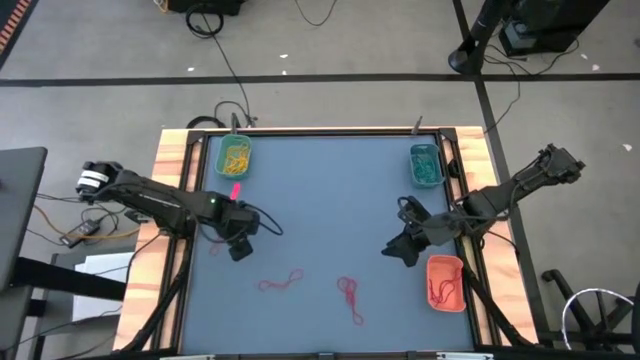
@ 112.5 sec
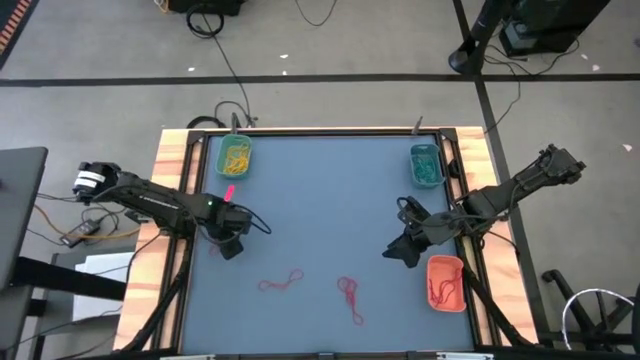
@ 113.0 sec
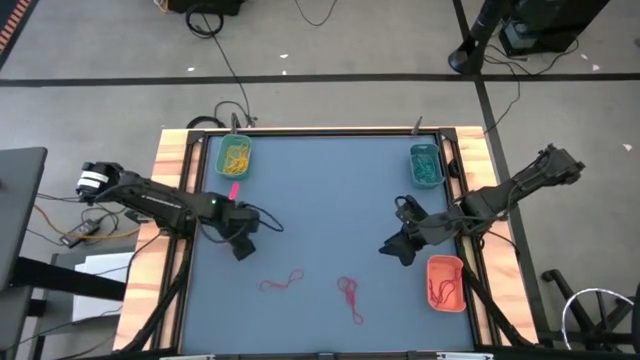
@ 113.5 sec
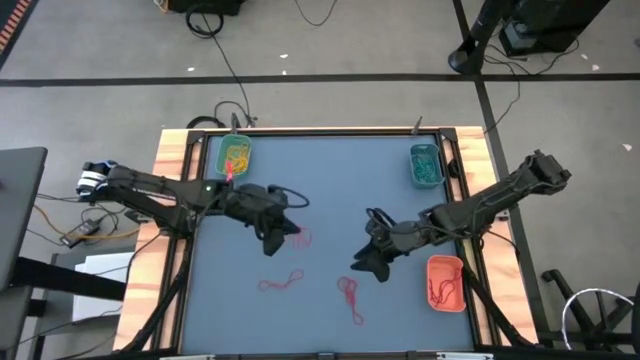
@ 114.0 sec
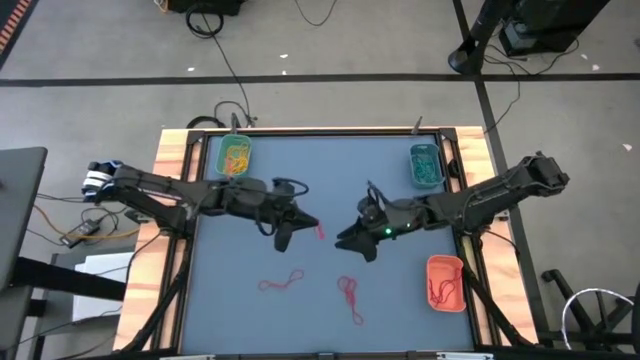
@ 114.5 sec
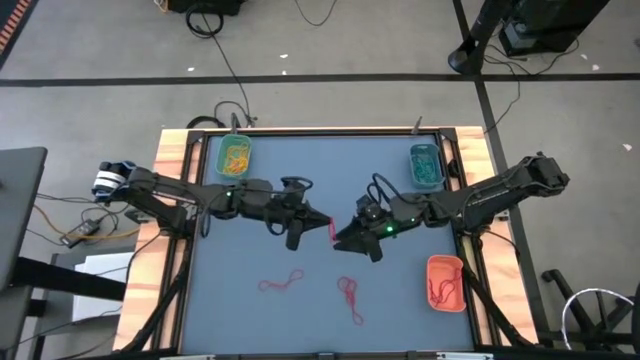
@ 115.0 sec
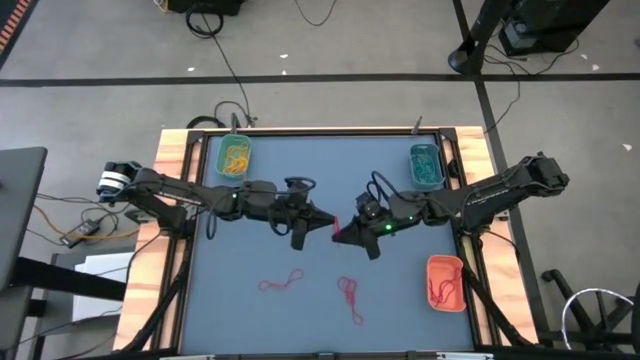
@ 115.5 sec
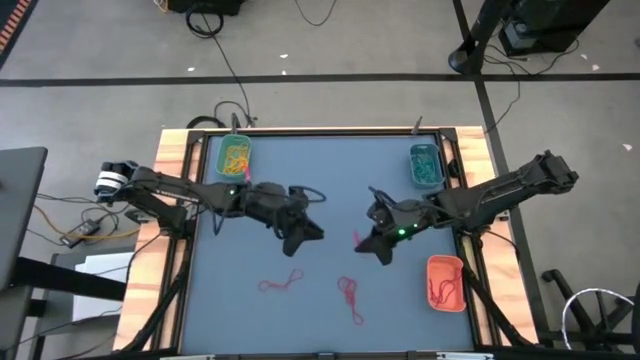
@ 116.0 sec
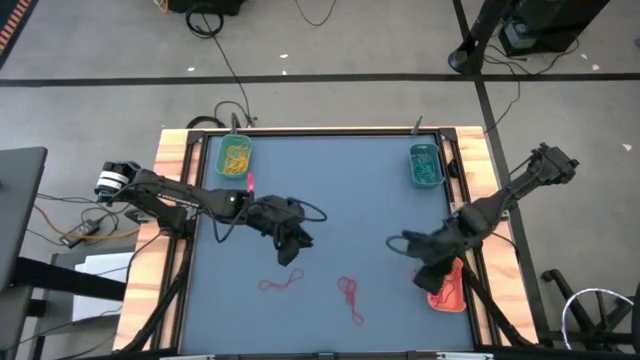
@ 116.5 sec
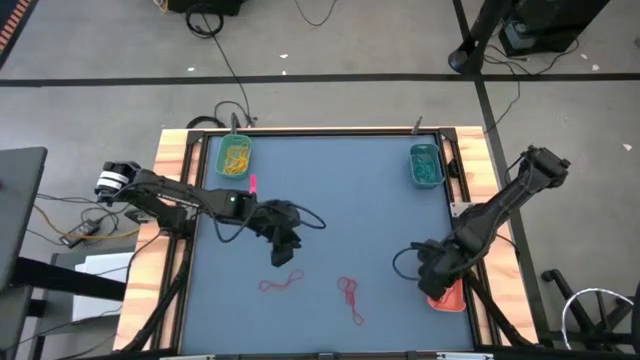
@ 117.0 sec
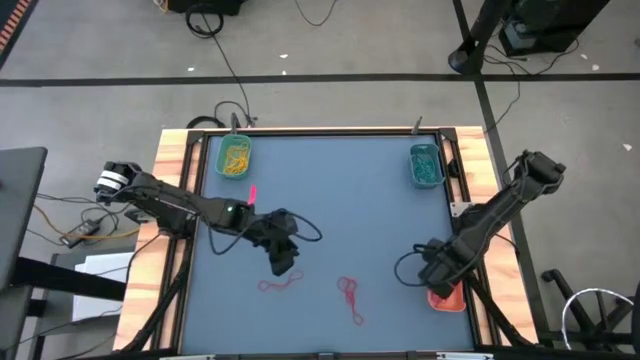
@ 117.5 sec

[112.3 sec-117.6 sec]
Task: Sort rubber bands into baskets
Put the red rubber band into the orange bin

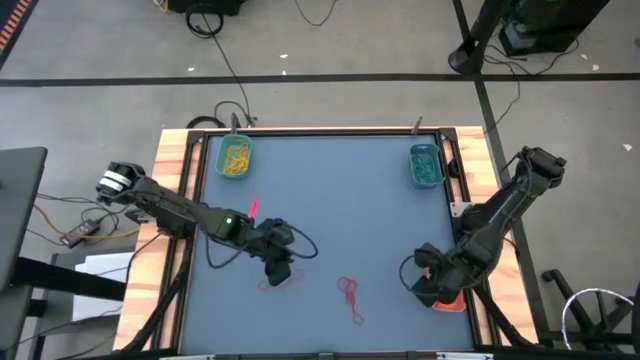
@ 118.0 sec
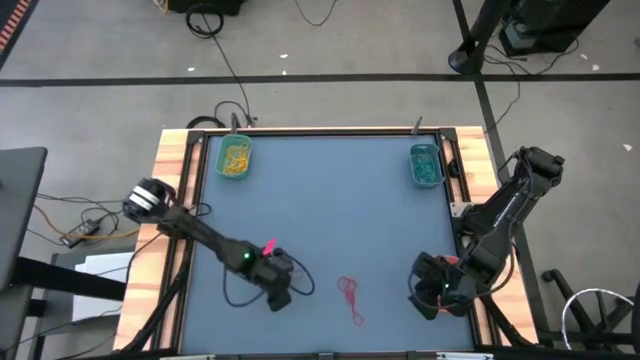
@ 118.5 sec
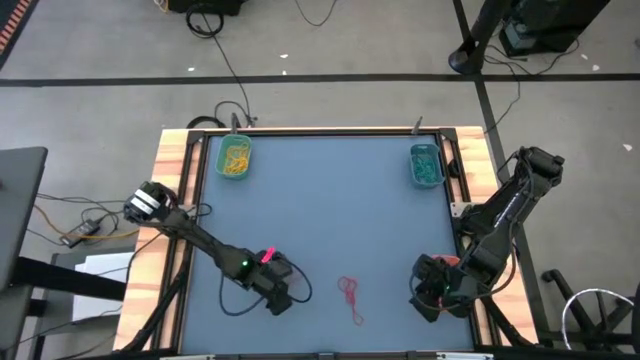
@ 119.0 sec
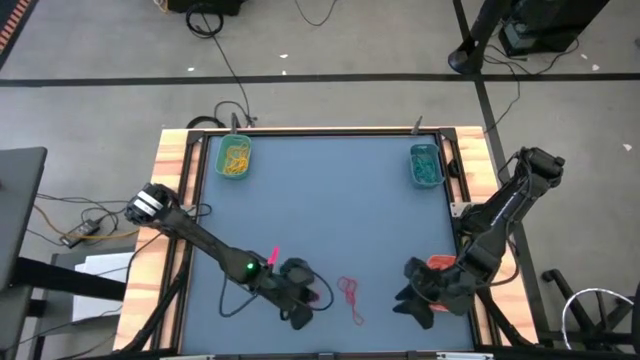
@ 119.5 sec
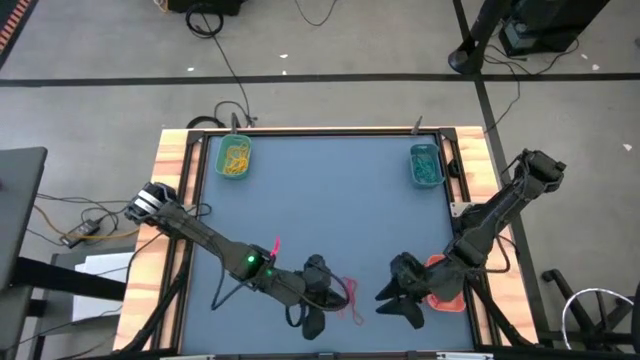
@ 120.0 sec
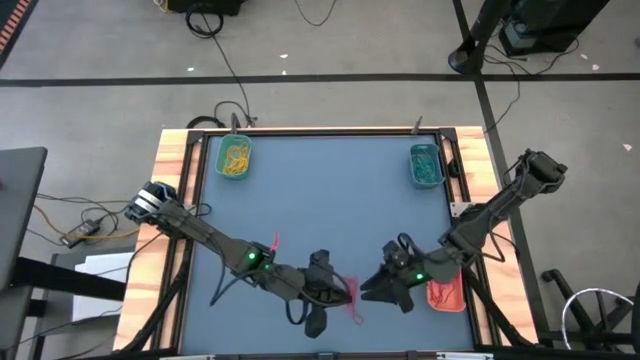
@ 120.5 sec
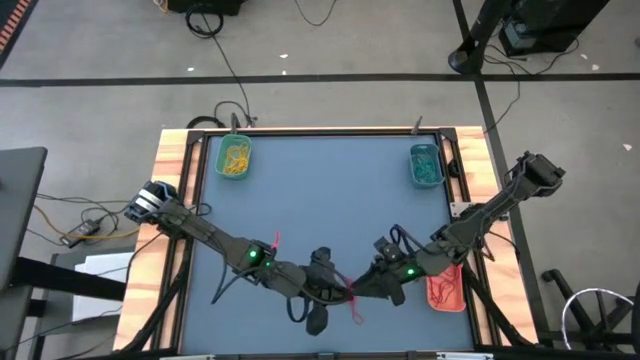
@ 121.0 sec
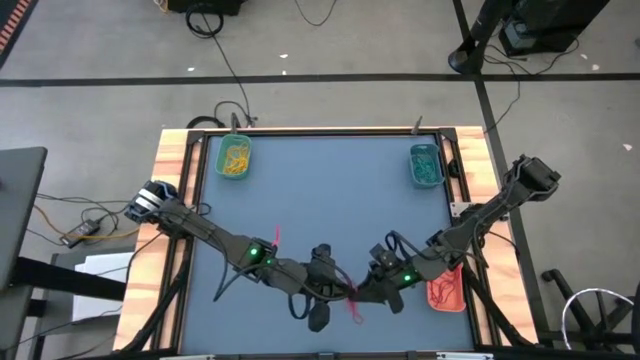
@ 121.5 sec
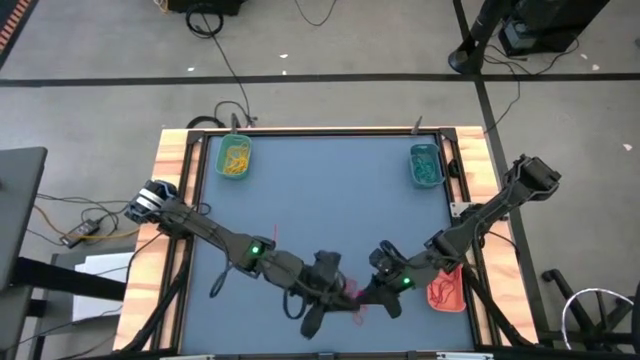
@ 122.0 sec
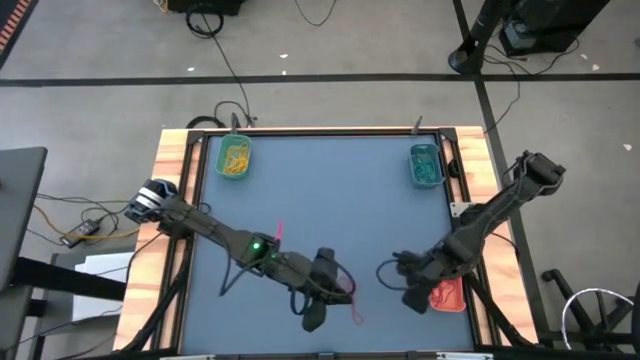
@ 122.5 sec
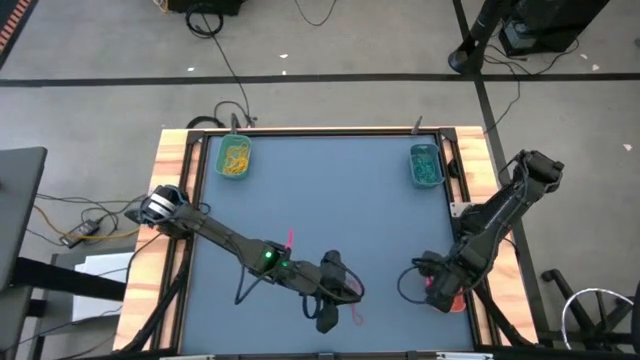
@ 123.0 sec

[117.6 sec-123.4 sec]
Put the red rubber band into the orange bin

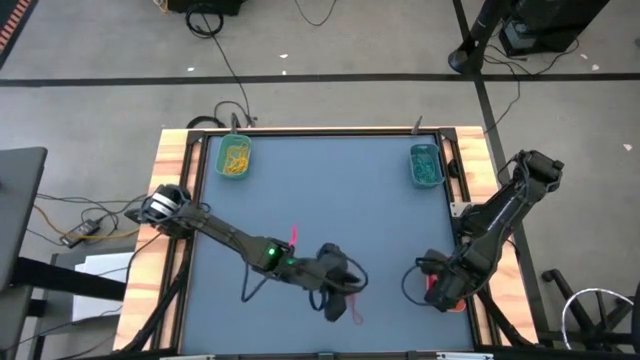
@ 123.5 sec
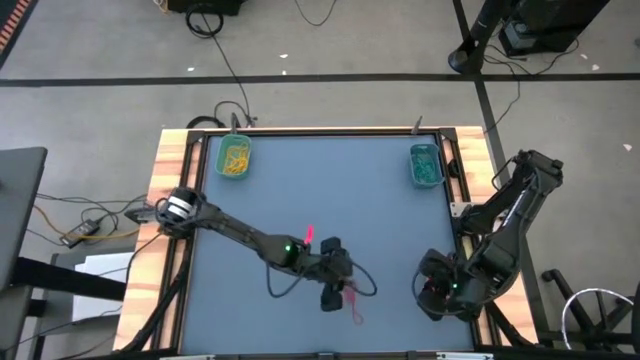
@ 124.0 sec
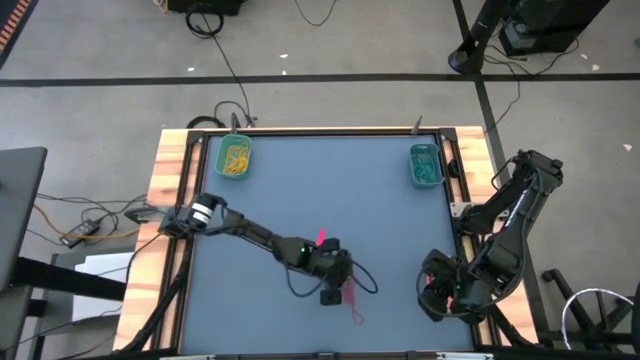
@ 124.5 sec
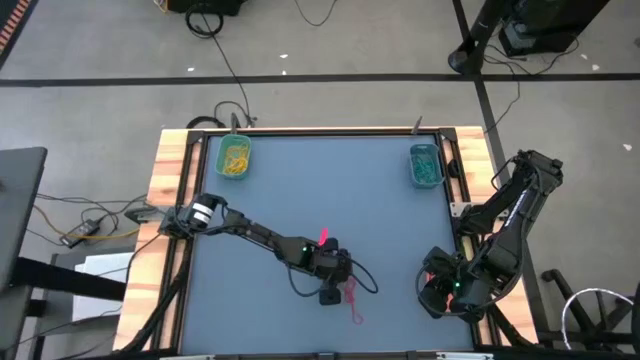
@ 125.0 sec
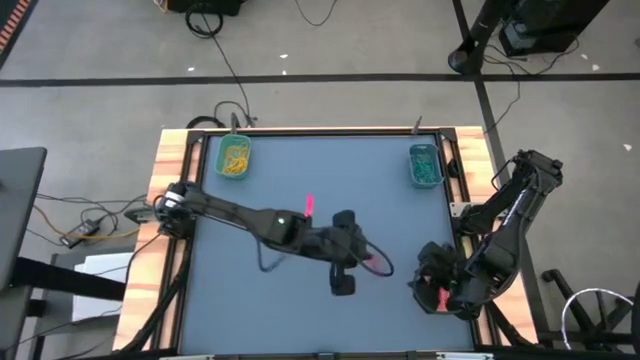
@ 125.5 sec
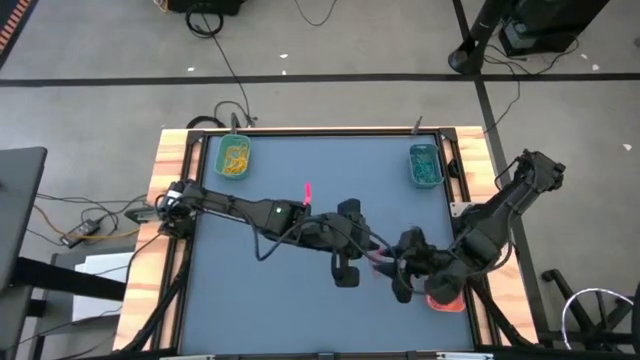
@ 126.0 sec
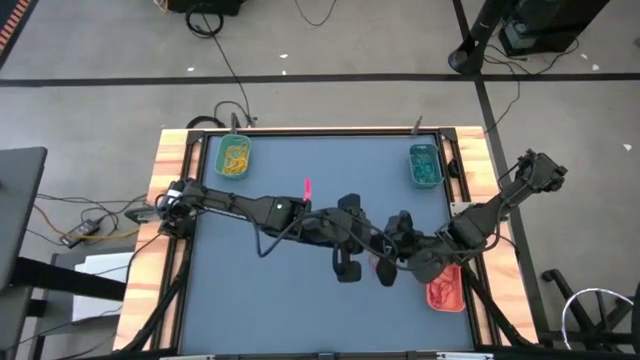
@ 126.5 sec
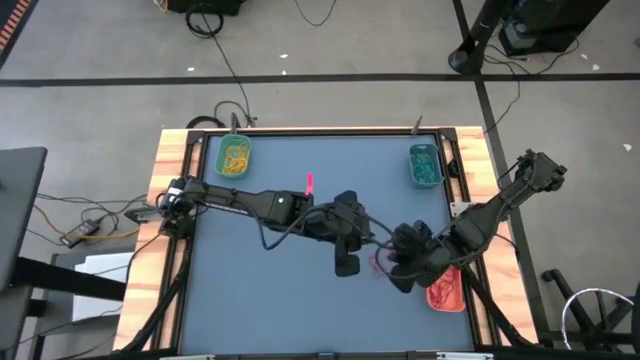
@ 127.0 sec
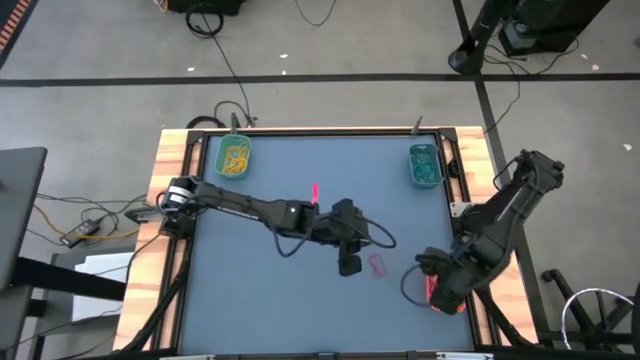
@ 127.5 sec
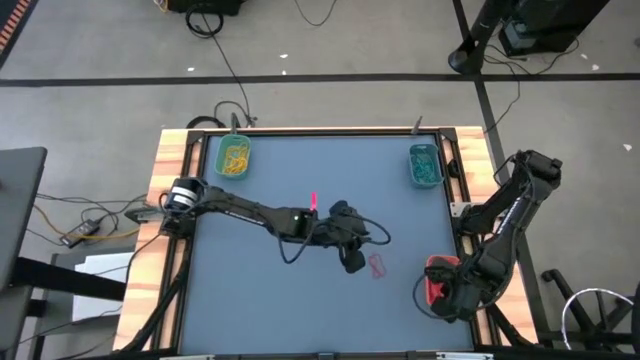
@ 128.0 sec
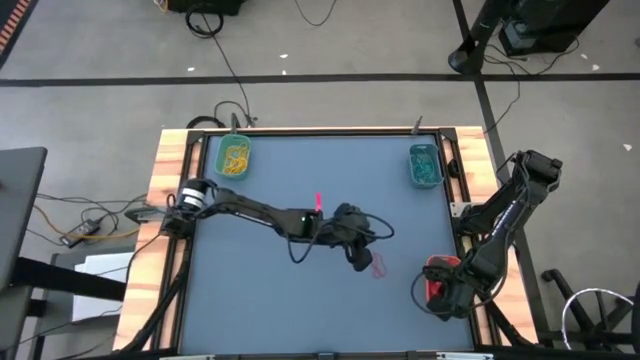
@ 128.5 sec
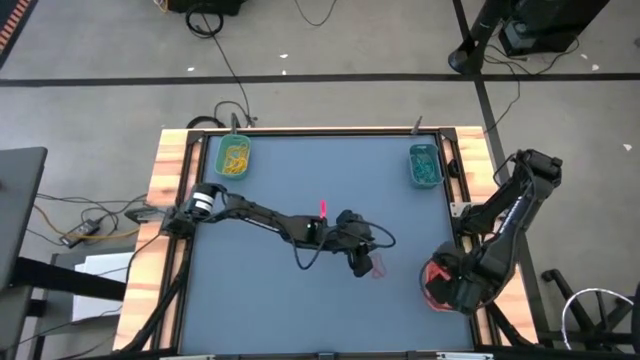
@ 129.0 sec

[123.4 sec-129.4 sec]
Put the red rubber band into the orange bin

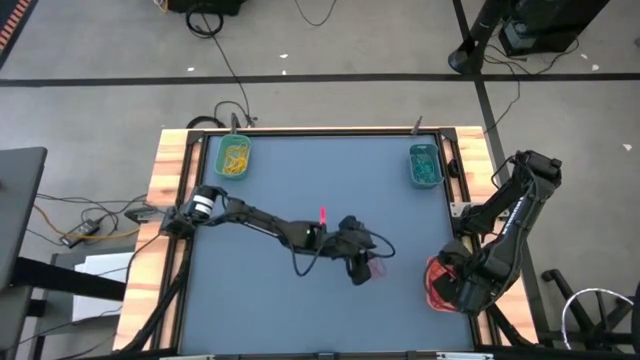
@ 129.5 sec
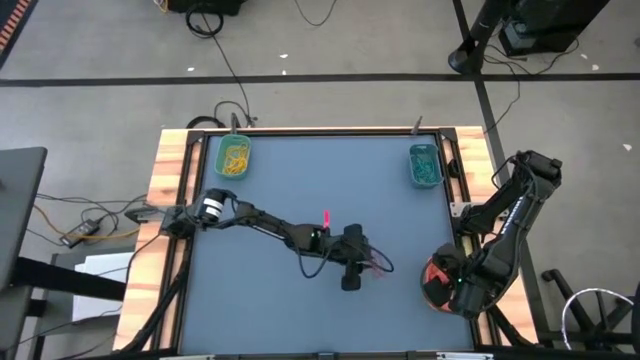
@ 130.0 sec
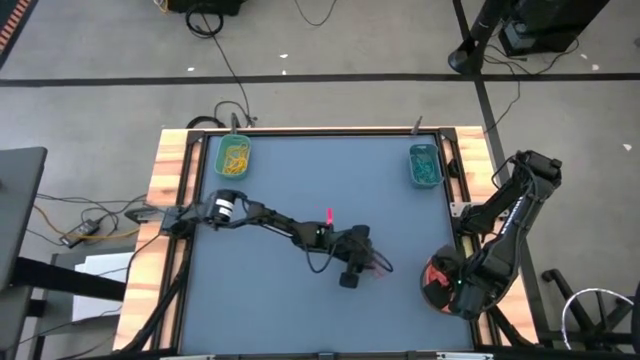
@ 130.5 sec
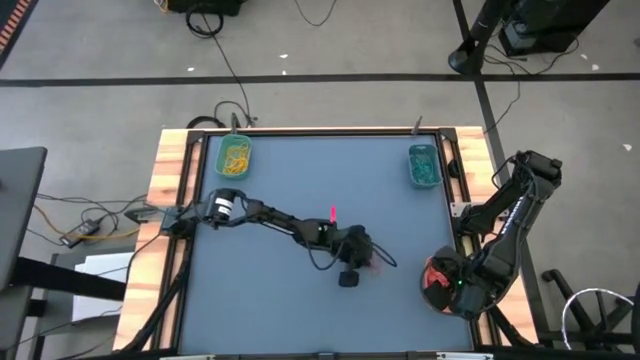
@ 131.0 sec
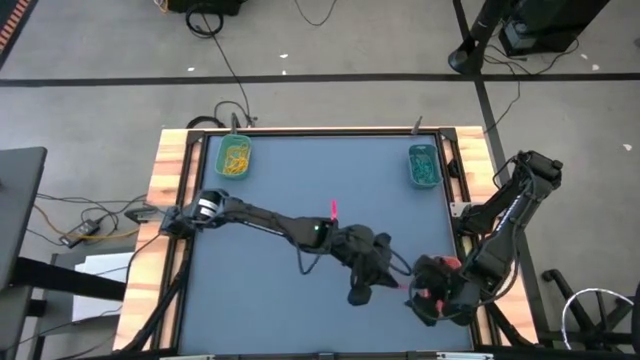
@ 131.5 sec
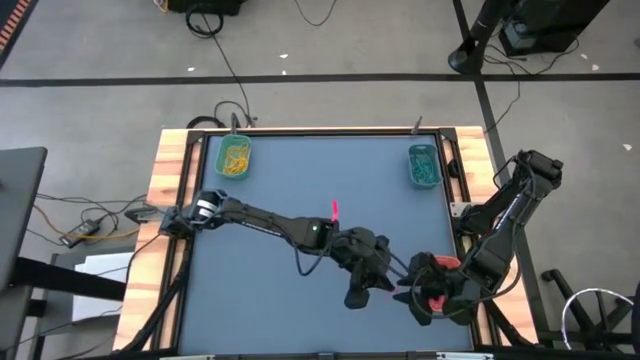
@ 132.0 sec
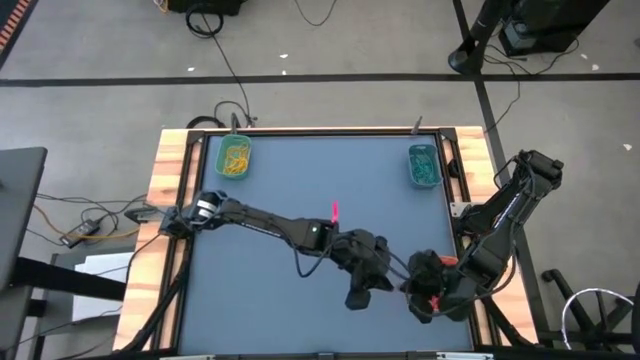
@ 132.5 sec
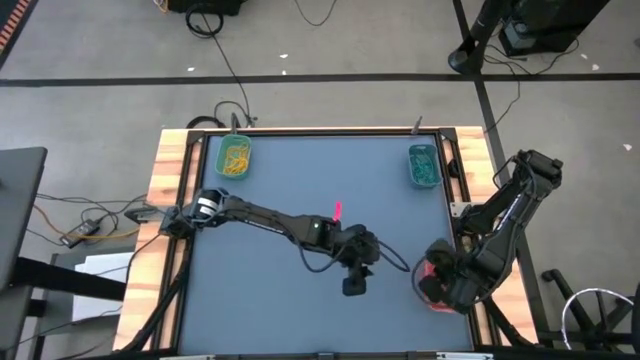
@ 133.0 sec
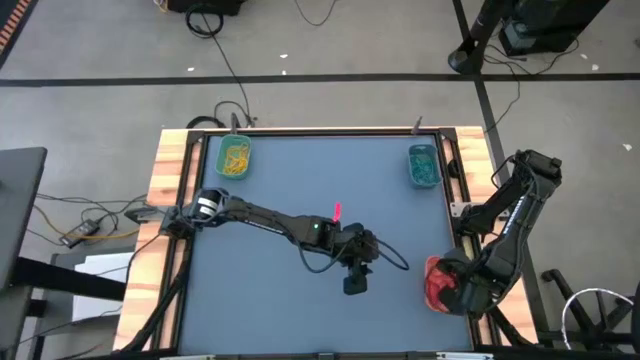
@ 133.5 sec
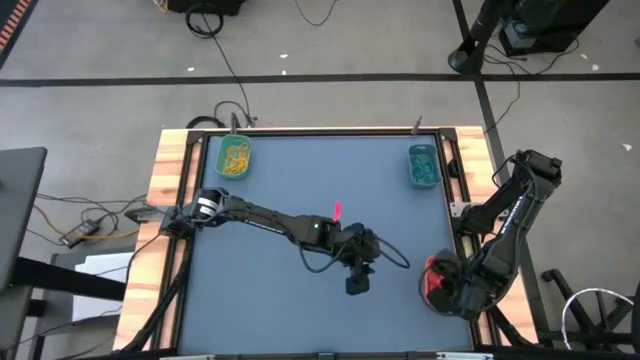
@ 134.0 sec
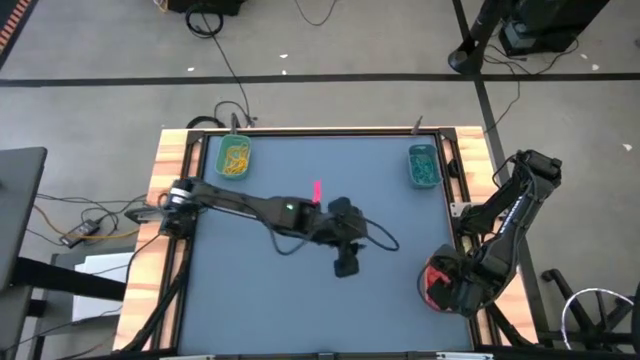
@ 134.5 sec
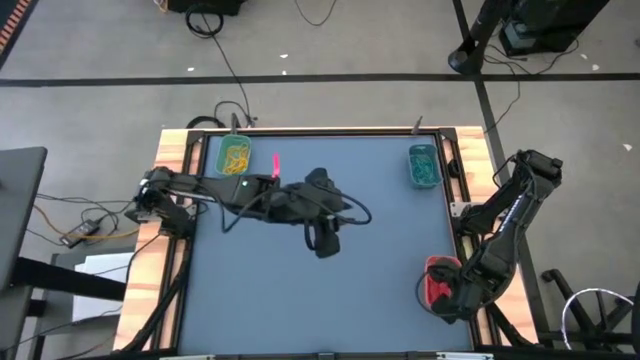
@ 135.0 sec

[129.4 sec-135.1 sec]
Put the red rubber band into the orange bin
